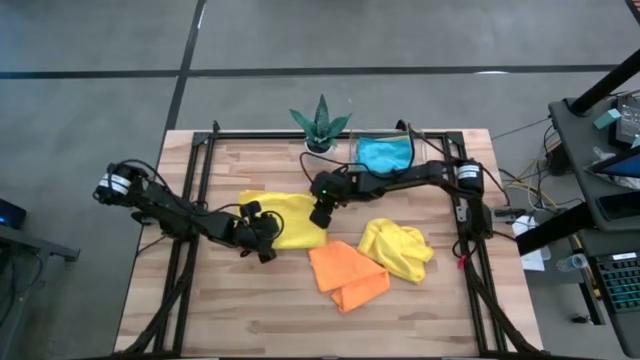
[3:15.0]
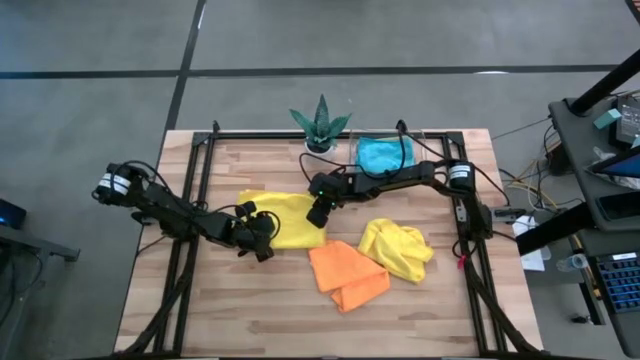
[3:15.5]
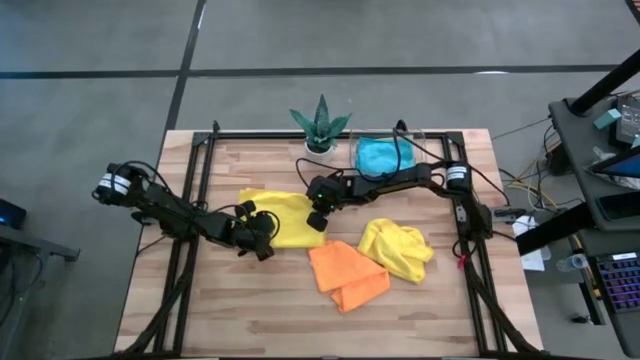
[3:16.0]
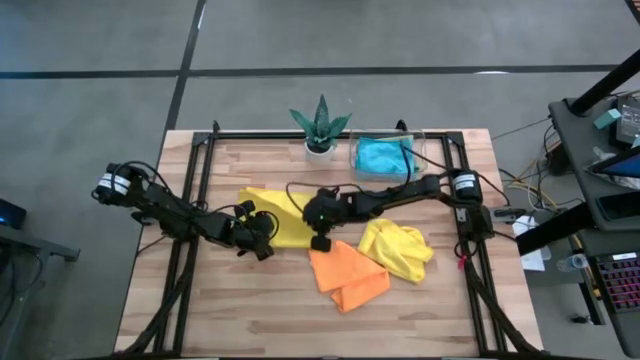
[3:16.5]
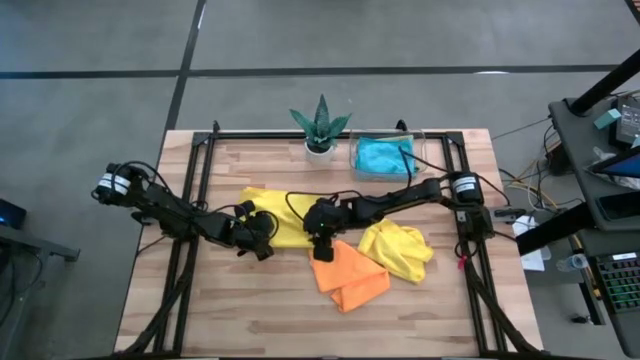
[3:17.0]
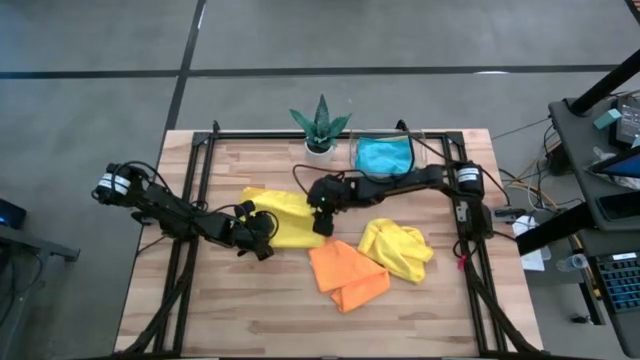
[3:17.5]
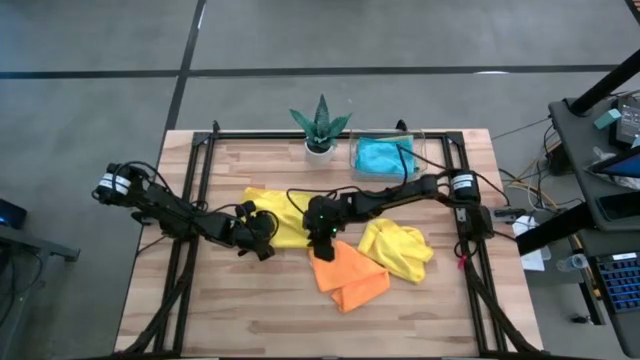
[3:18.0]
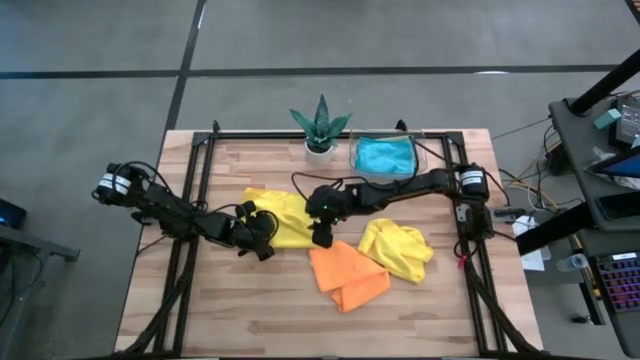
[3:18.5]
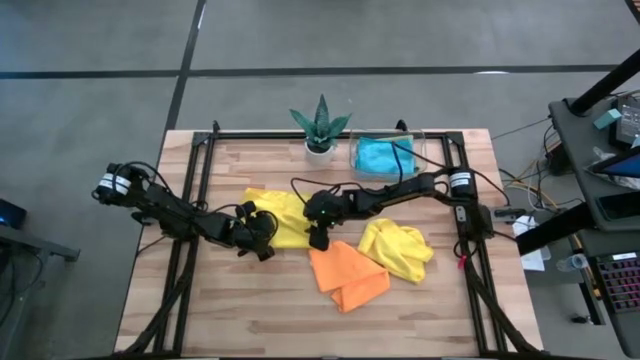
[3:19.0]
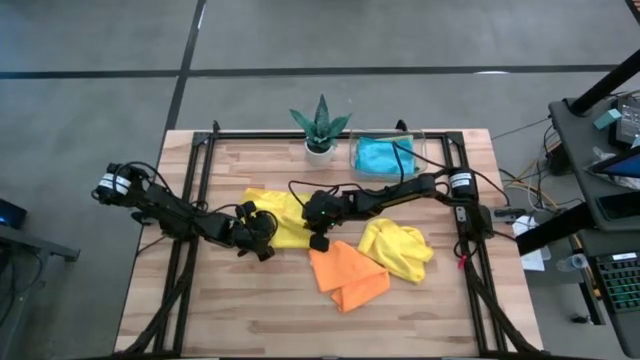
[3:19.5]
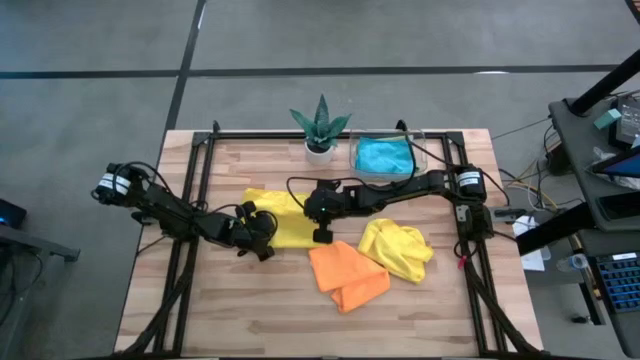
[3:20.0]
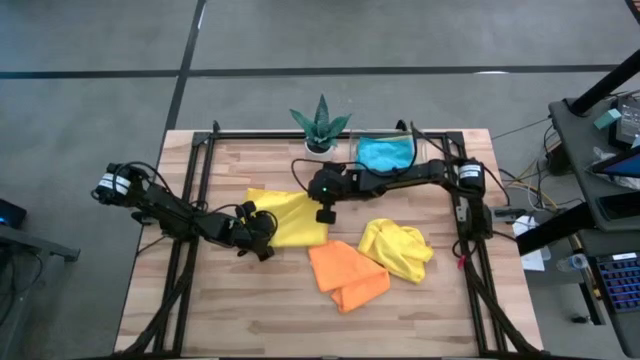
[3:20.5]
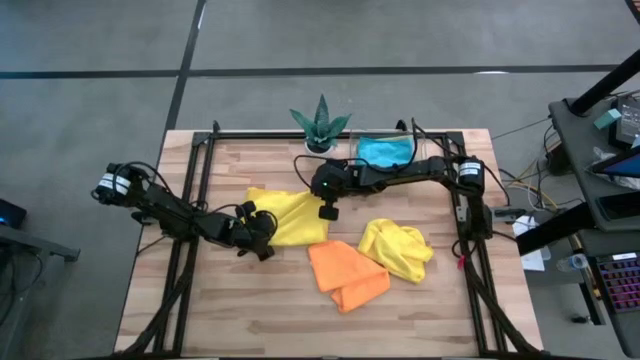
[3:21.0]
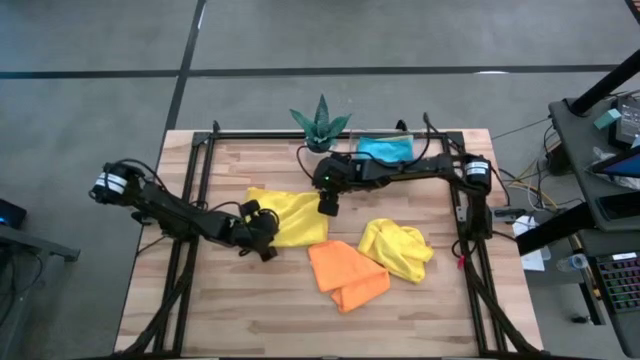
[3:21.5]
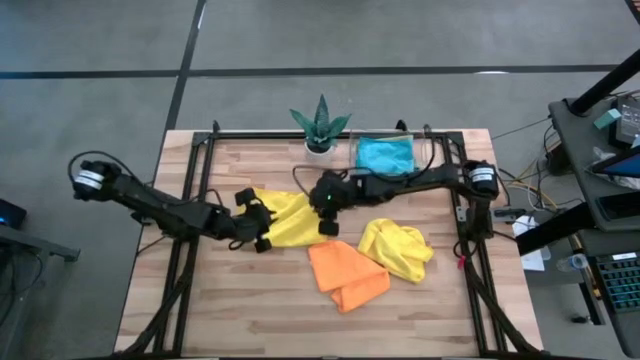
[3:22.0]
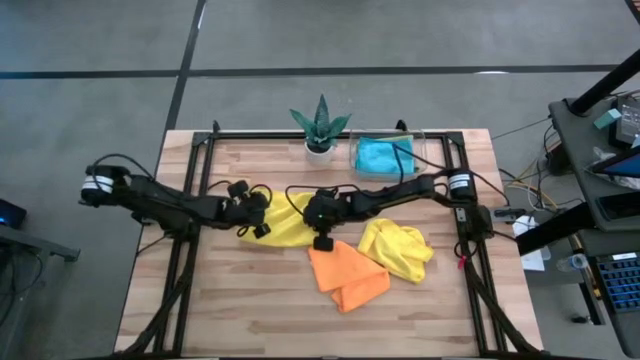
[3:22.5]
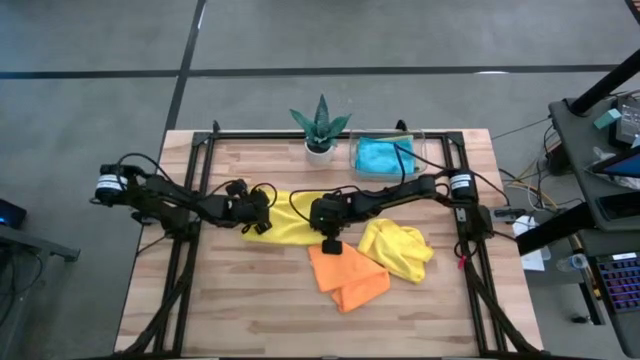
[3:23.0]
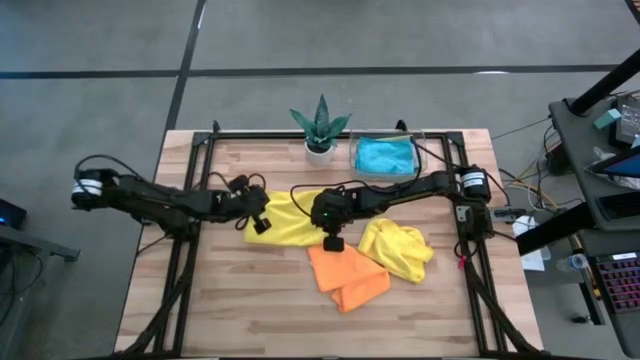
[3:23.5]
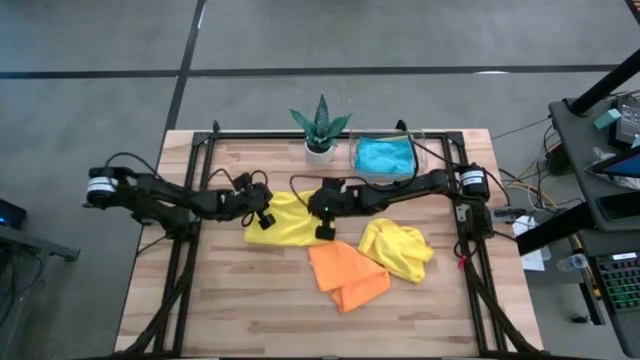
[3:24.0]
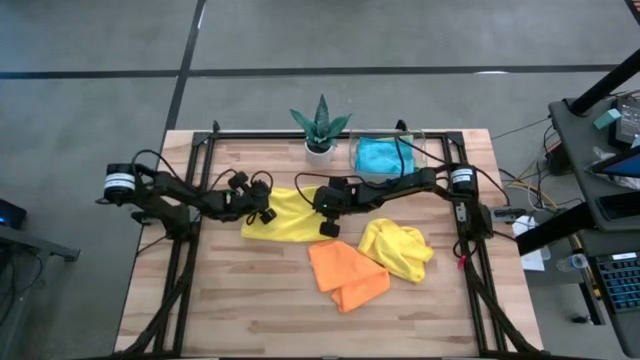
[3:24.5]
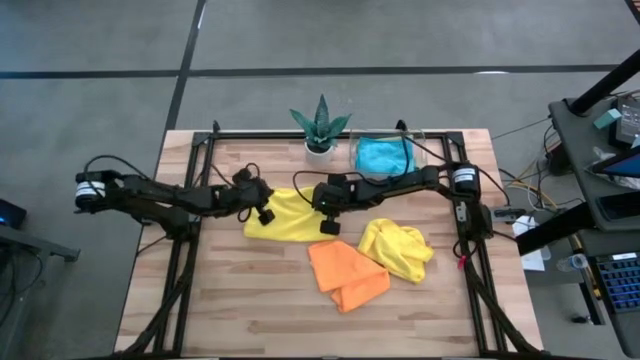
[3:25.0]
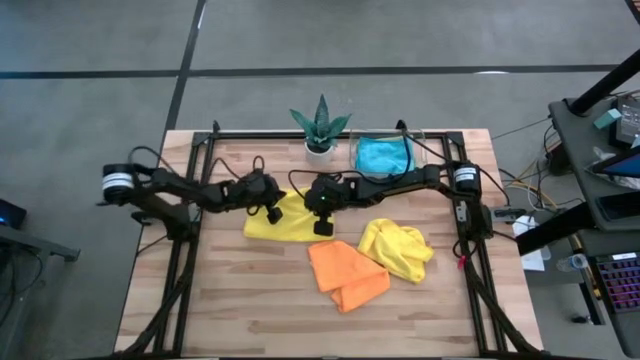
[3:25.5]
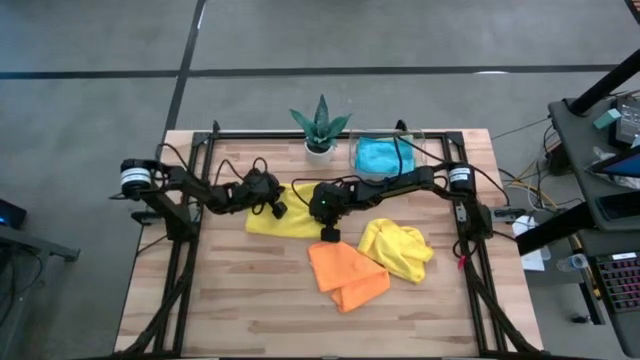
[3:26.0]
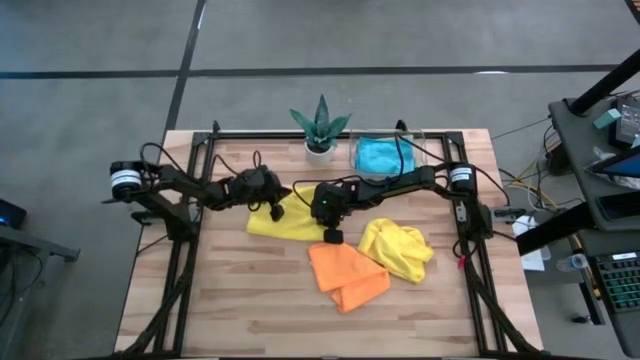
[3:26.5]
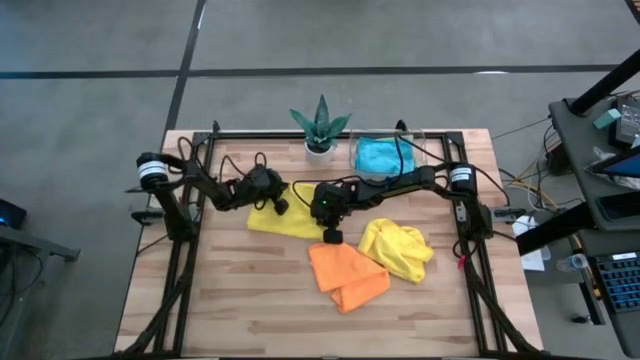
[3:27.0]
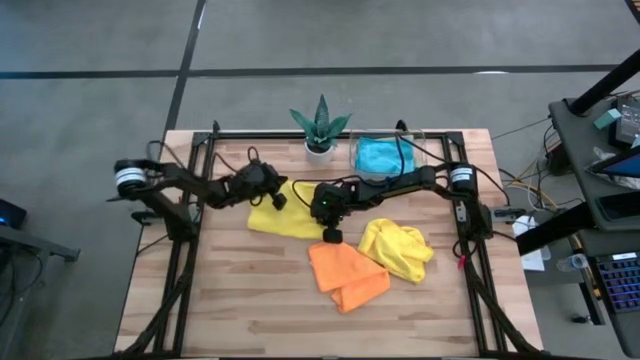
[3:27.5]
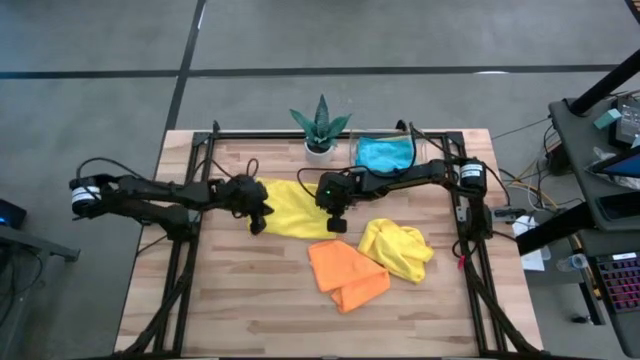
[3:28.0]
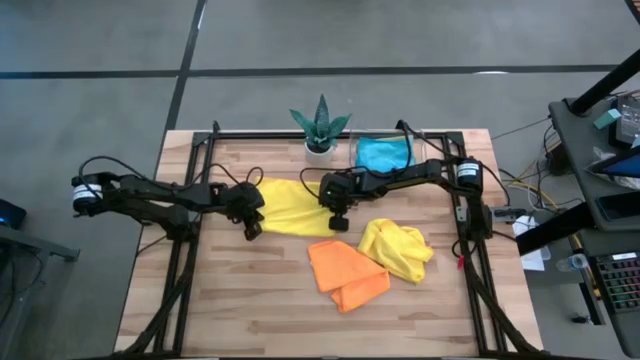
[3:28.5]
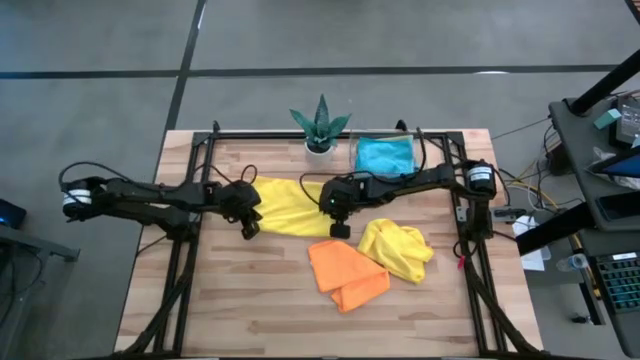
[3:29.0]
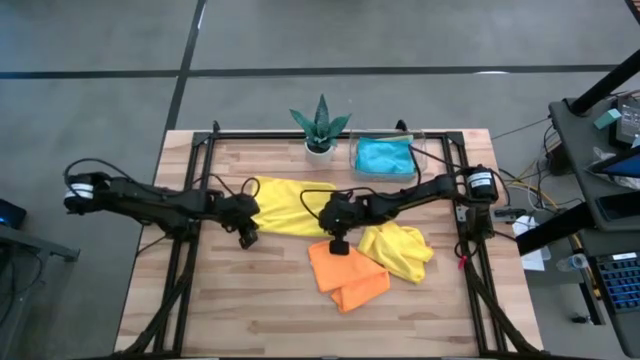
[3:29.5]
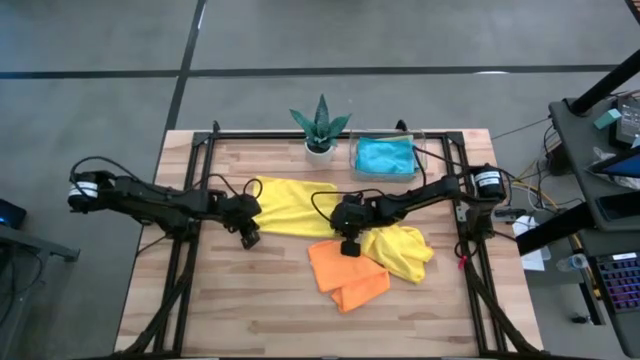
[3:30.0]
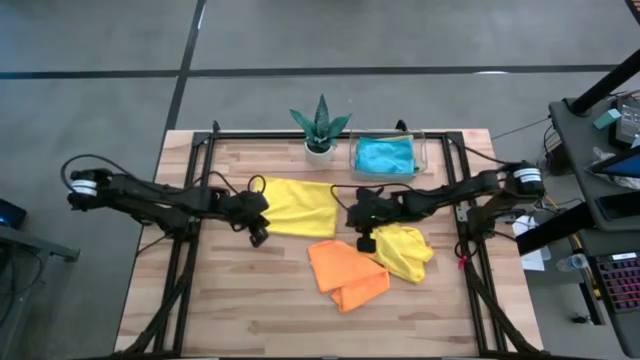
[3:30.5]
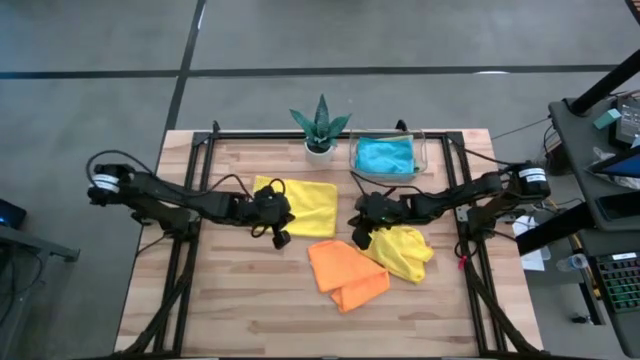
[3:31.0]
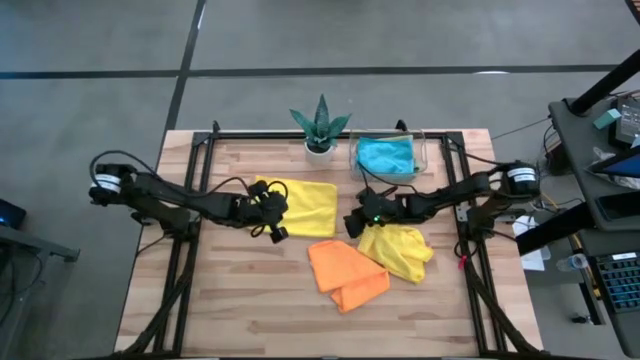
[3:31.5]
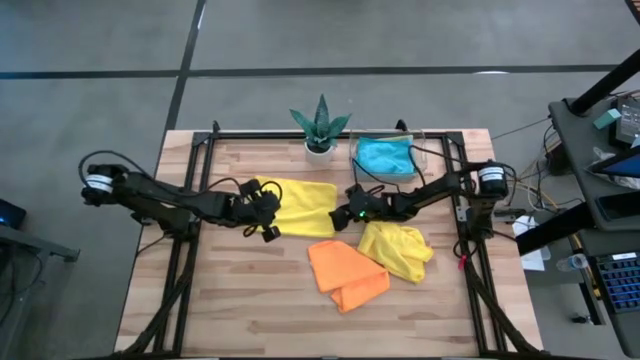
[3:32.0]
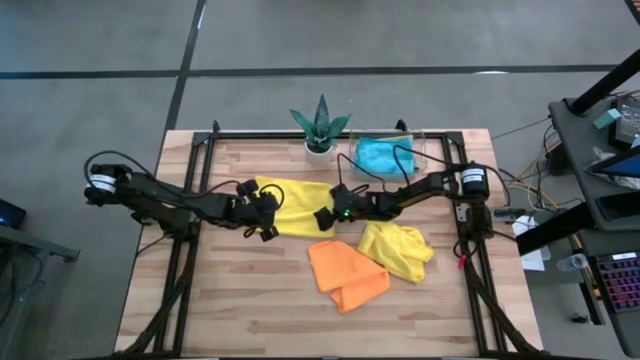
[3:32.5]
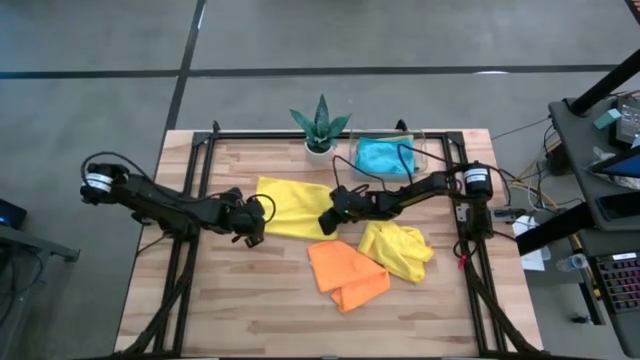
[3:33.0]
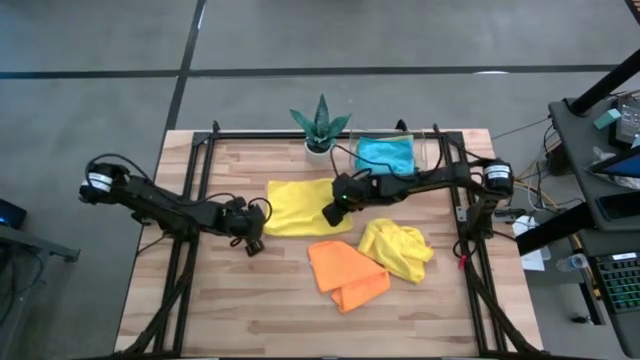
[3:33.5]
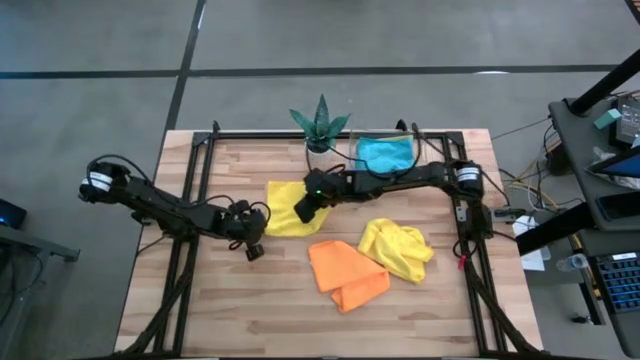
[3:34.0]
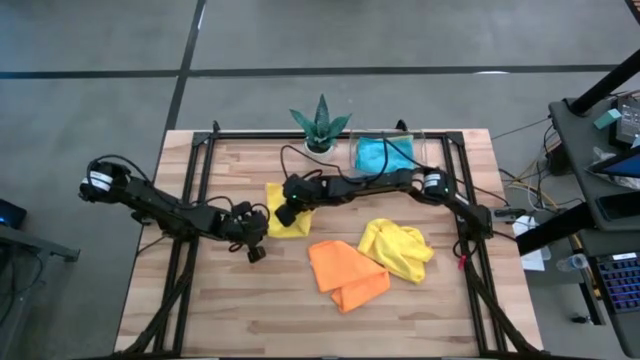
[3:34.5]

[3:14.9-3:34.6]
Task: Fold microfiber towels
Fold the left yellow microfiber towel
